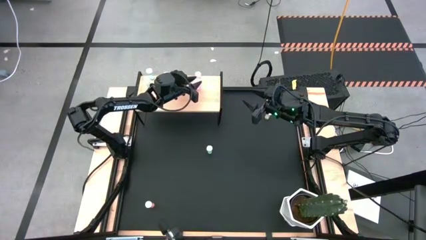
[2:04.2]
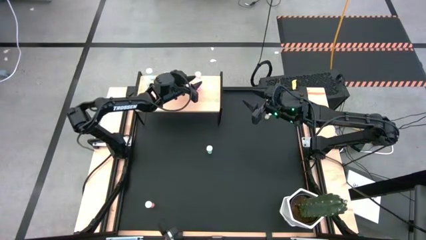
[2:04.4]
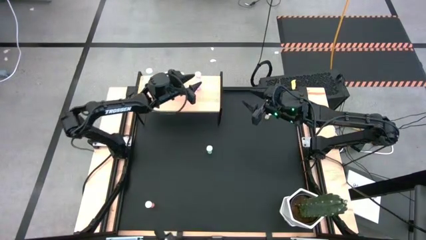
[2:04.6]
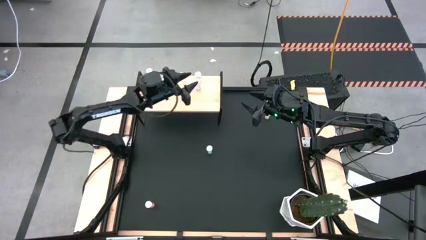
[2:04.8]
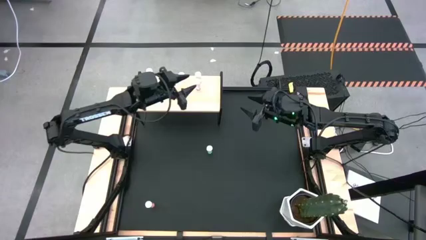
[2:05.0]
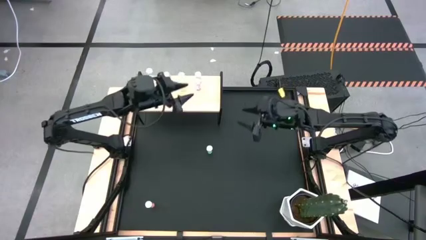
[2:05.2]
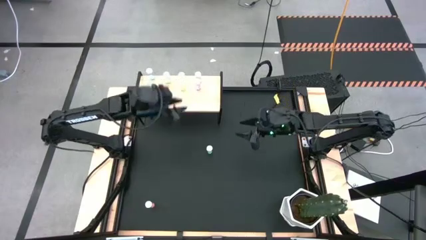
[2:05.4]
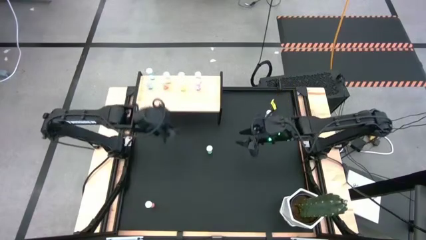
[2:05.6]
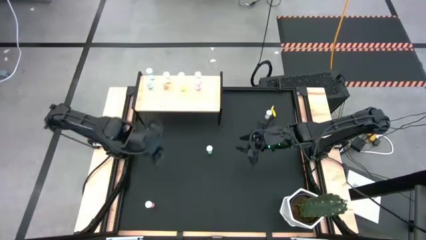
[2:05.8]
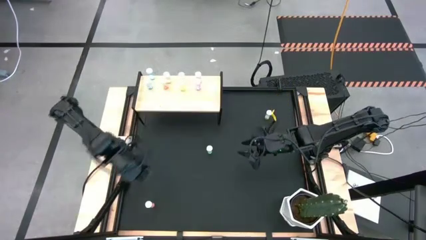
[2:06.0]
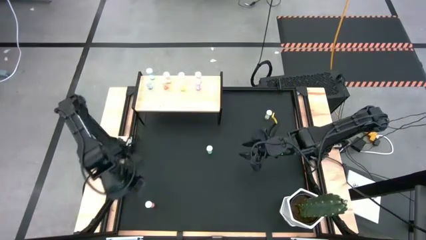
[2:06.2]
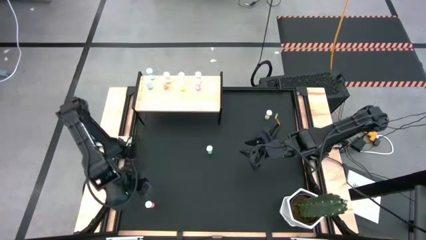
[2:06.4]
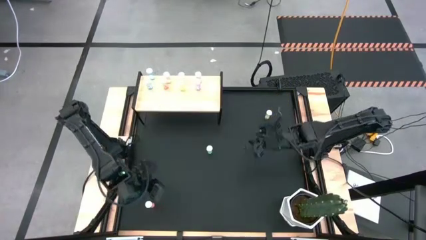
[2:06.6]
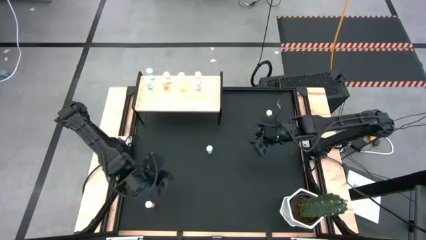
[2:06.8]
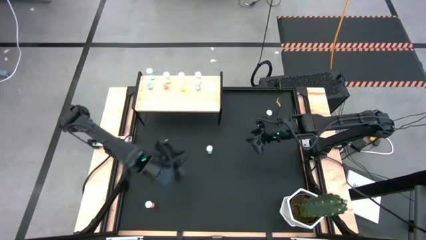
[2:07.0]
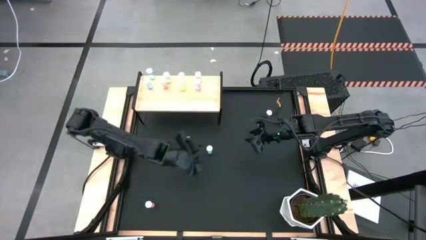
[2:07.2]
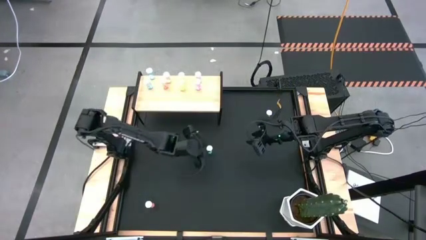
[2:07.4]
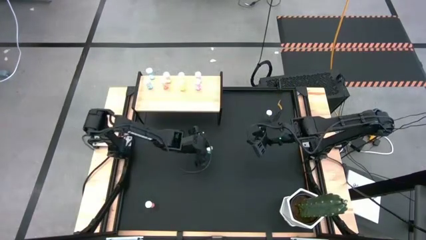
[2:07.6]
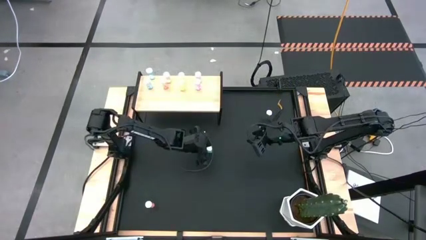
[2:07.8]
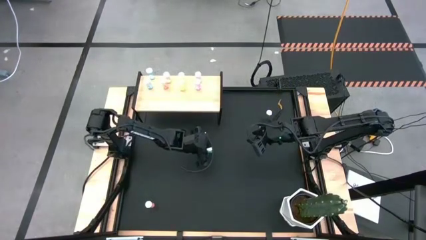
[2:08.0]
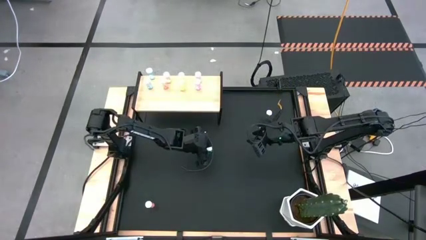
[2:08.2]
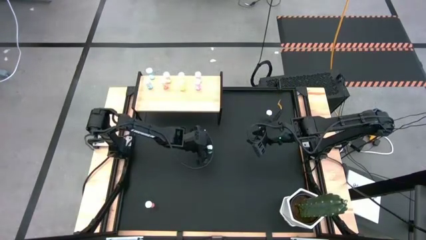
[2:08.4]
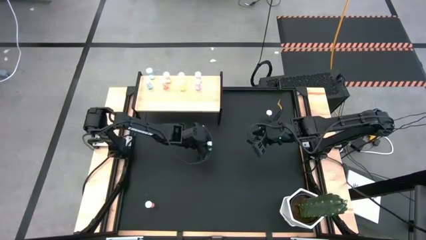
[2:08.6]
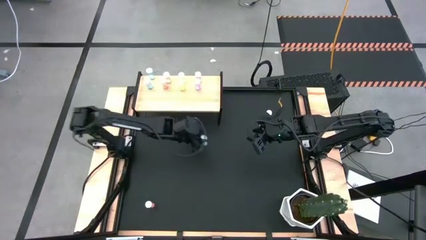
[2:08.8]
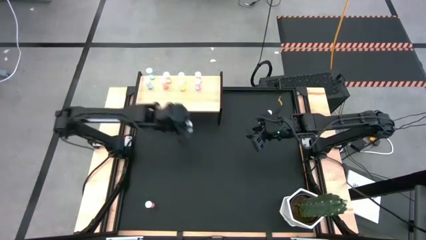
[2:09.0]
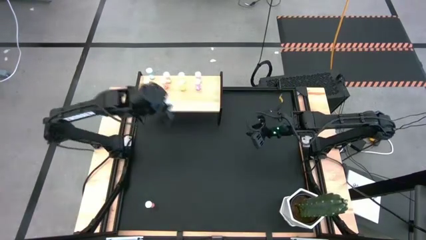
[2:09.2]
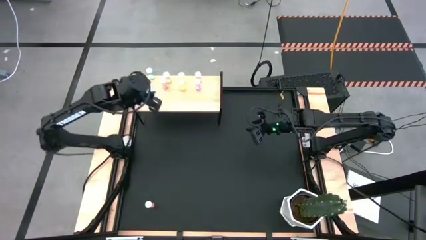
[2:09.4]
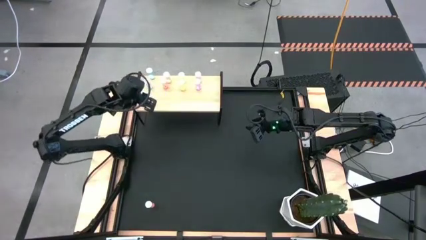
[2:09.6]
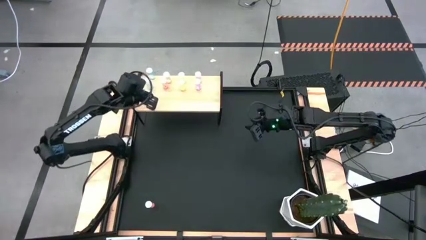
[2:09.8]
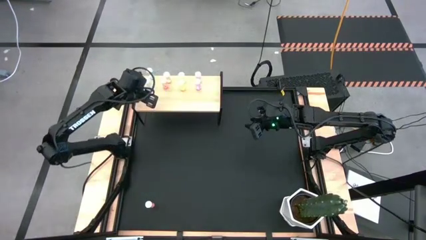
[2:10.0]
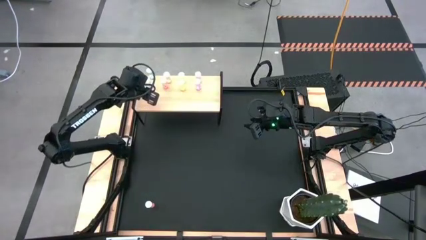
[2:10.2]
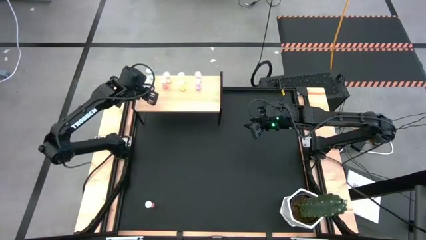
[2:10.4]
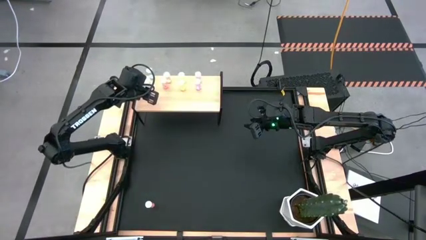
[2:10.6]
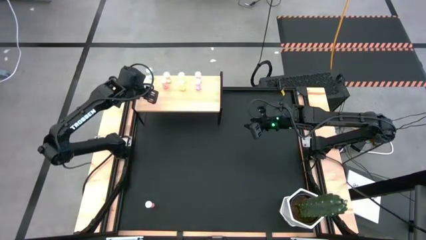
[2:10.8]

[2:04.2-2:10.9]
Task: Pick and place medicine bottles onto shelf by color
Put the blue pill bottle on the shelf aligned with the blue pill bottles

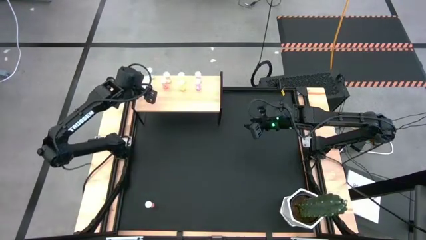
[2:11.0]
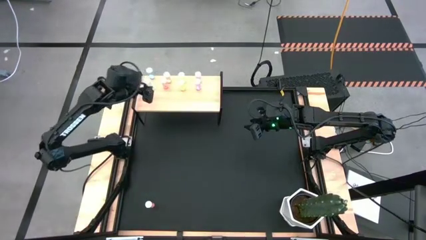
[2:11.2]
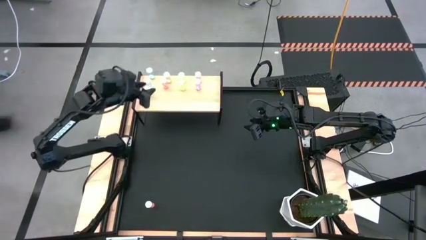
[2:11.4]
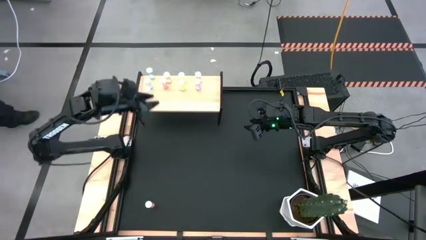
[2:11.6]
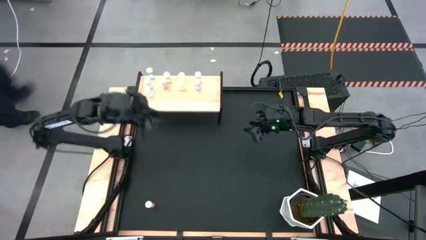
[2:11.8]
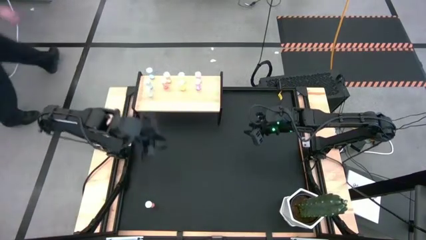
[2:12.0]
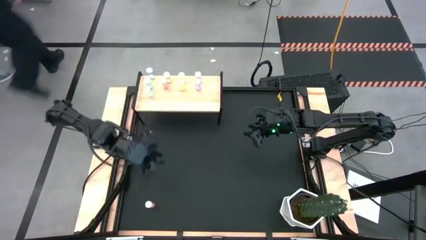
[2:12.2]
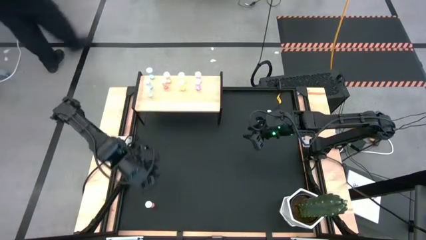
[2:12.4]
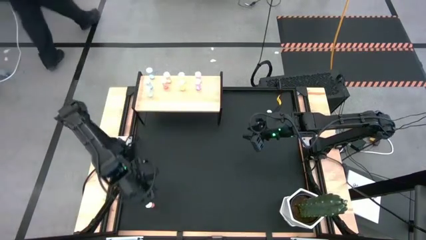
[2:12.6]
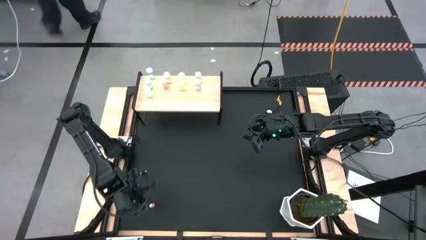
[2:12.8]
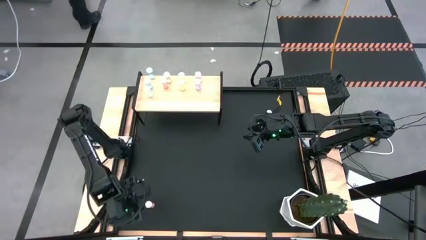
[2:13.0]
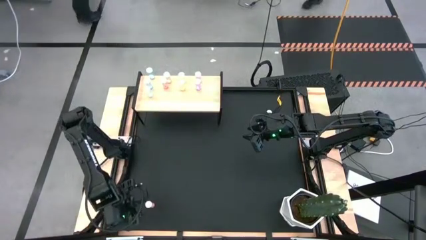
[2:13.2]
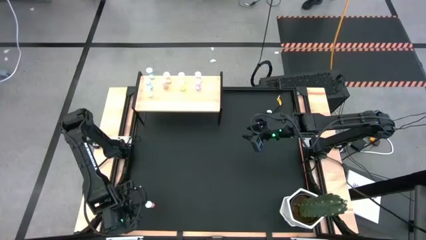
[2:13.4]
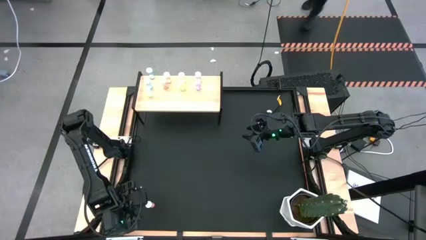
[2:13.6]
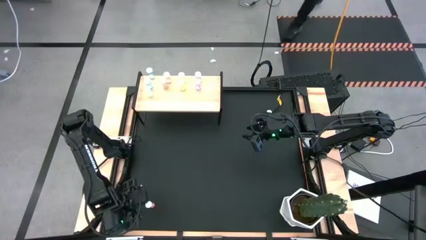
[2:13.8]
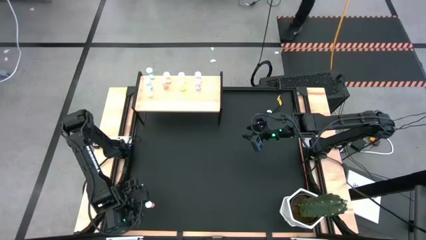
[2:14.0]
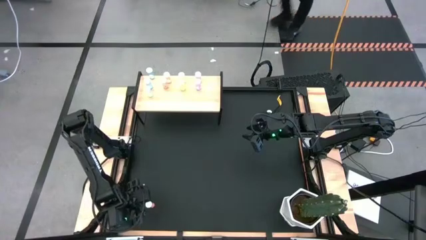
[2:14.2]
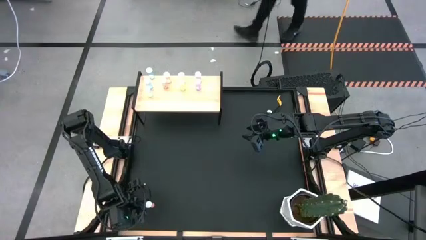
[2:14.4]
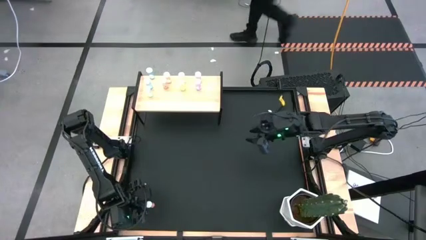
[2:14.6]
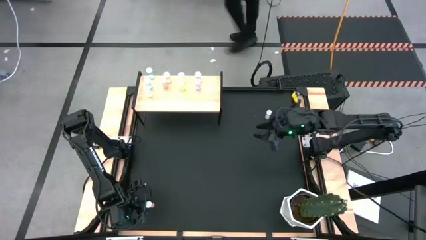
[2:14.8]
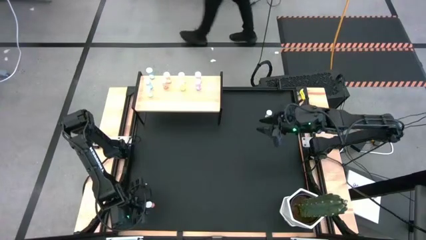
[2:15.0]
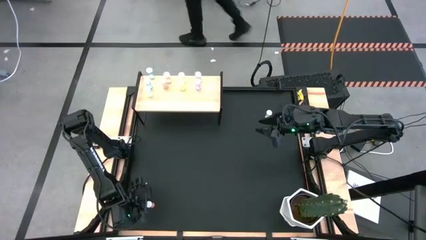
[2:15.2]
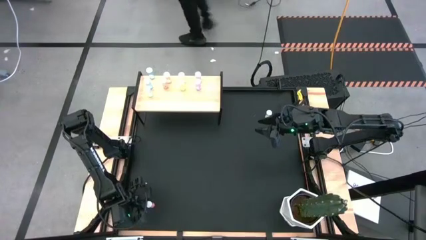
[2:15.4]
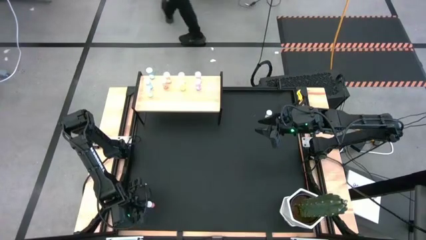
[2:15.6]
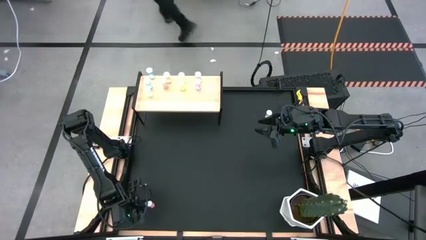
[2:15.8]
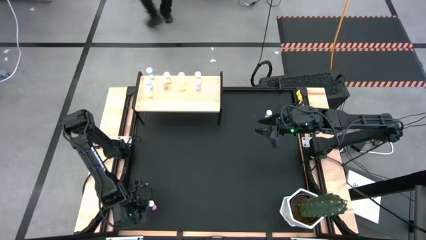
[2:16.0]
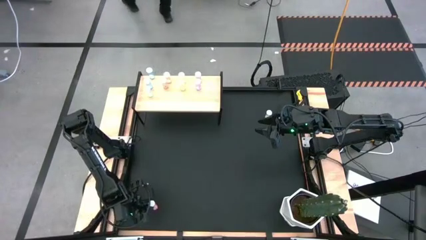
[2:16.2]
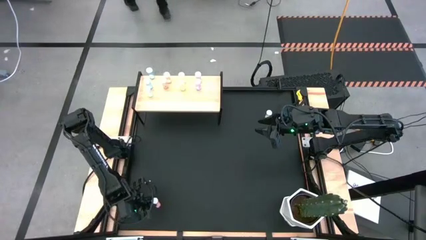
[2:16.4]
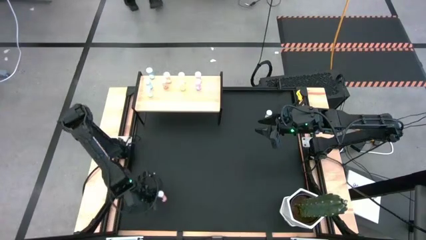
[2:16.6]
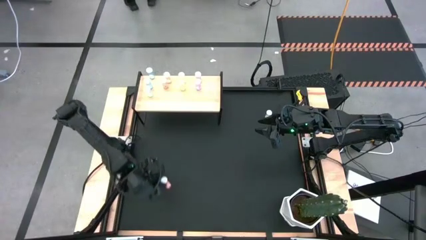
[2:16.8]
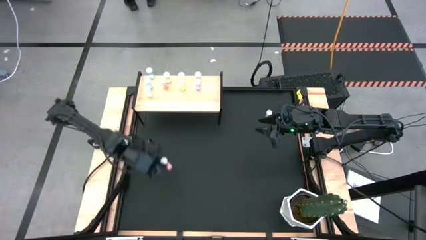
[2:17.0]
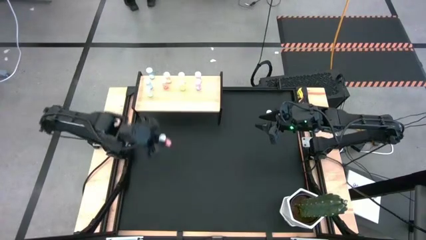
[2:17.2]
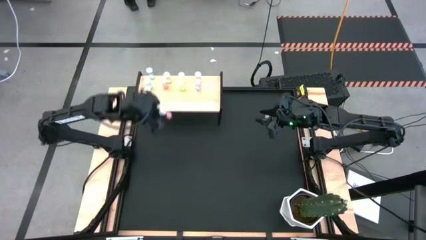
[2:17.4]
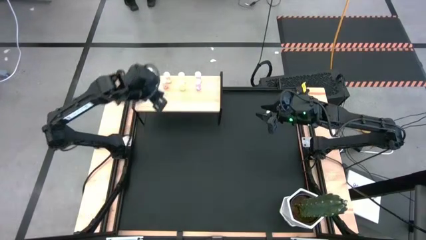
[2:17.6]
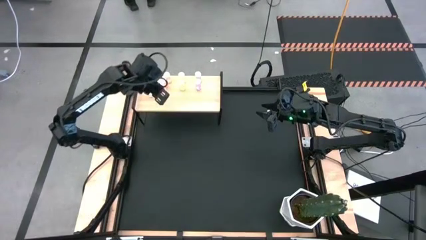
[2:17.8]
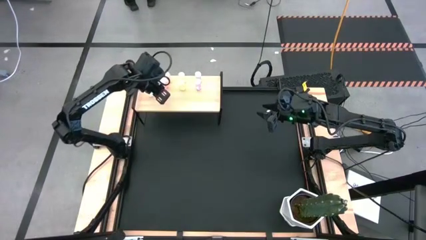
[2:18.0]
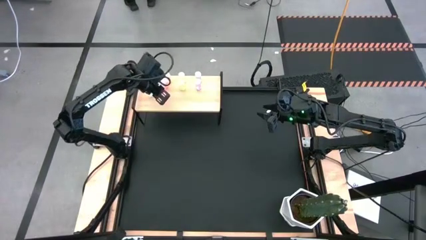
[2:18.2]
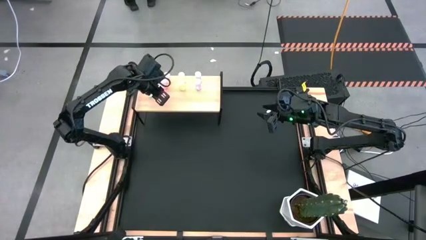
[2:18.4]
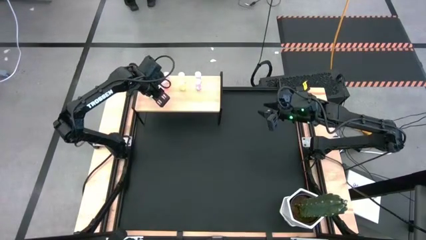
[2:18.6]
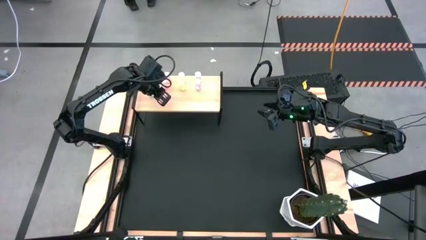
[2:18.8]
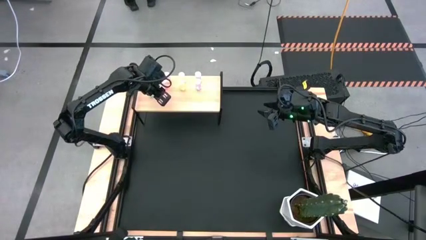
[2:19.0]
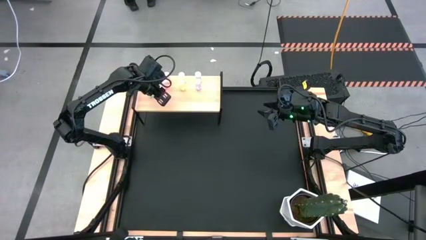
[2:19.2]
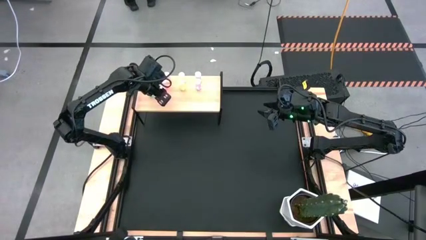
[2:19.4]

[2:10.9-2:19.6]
Put the red pill bottle on the shelf aligned with the red pill bottles
